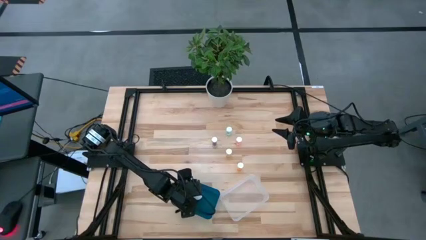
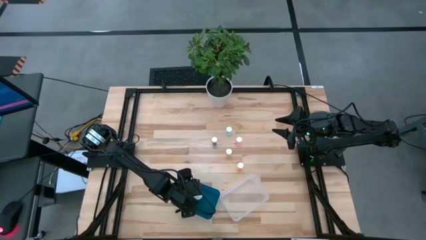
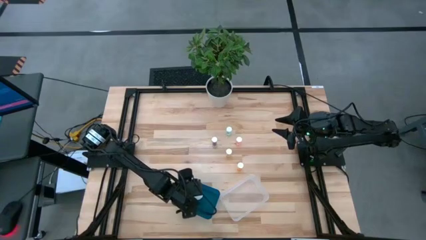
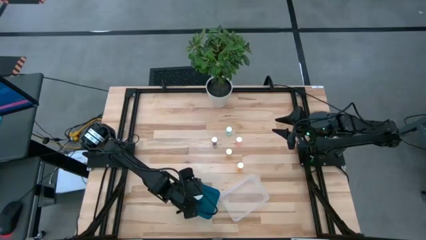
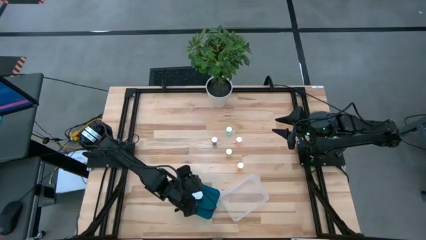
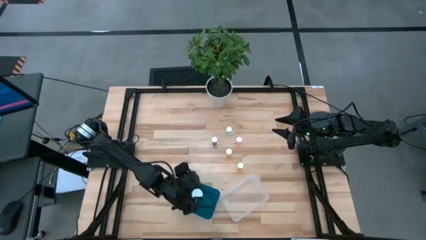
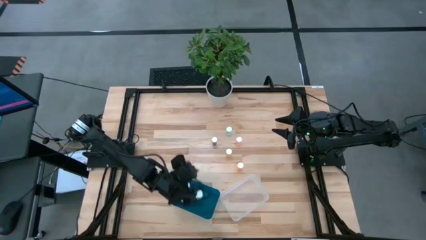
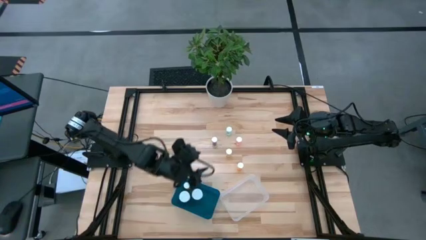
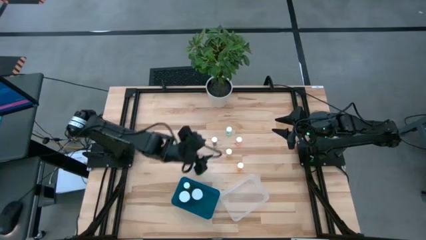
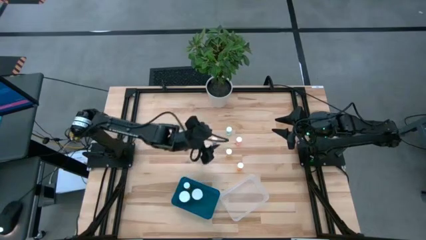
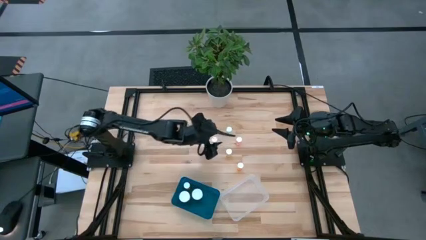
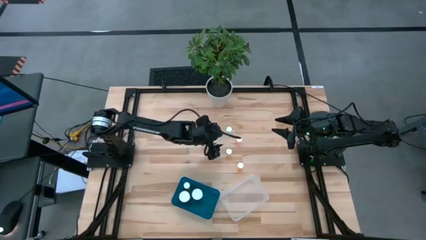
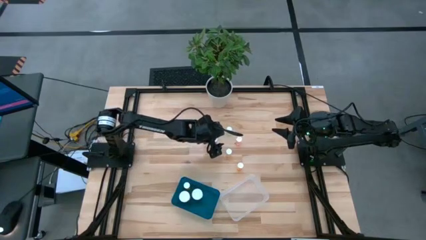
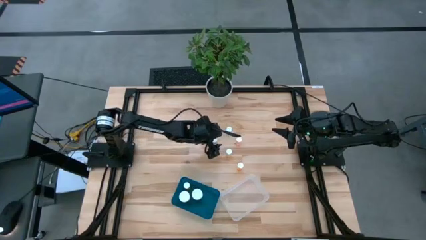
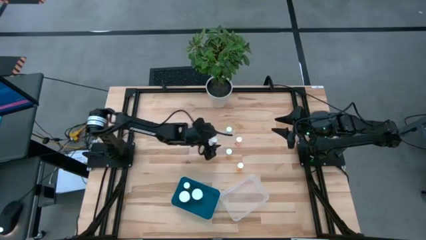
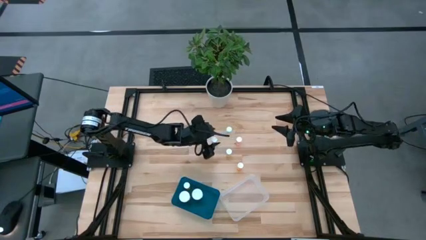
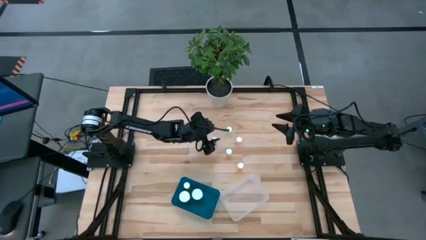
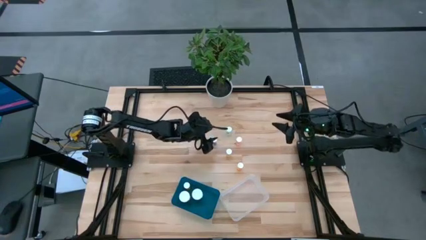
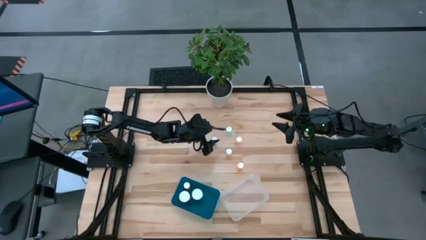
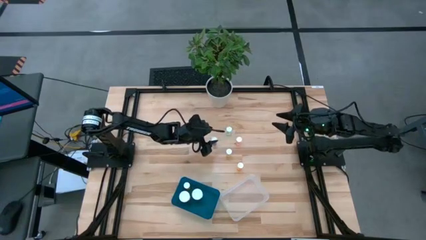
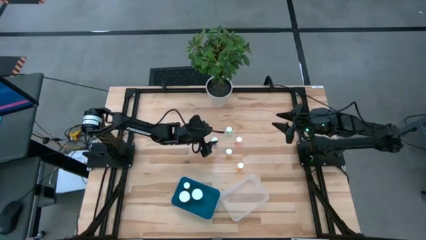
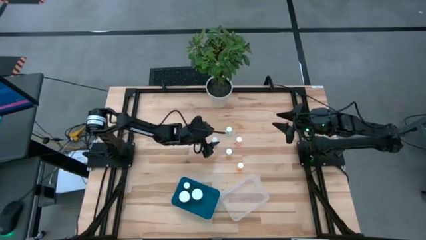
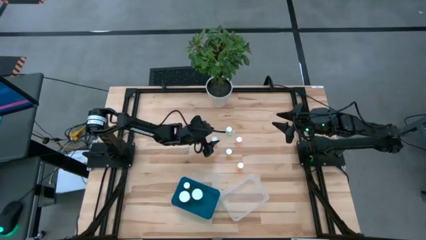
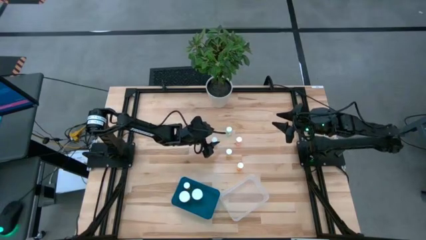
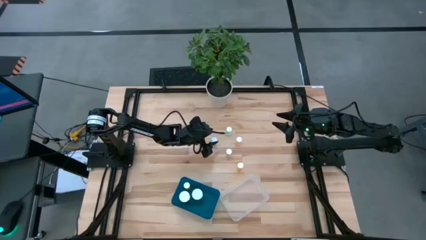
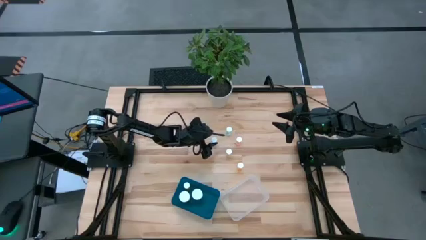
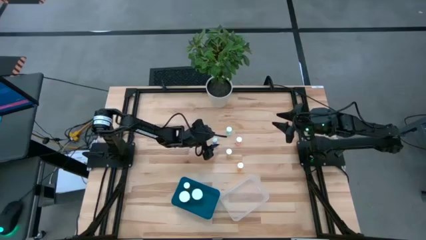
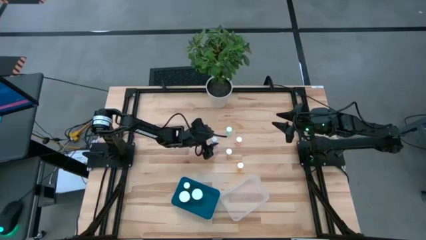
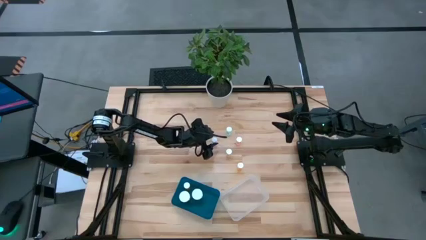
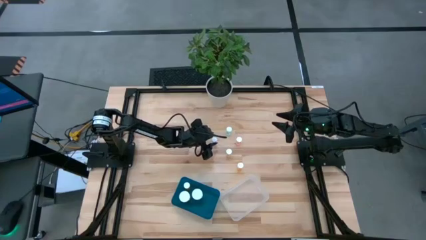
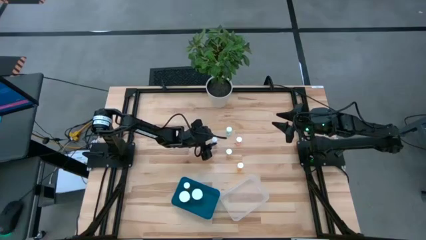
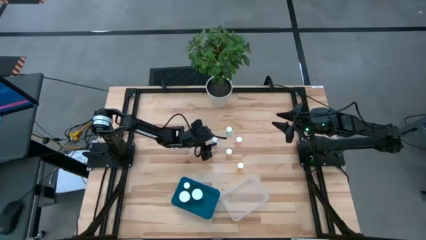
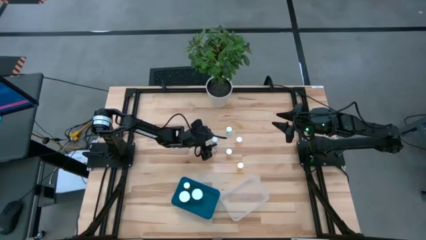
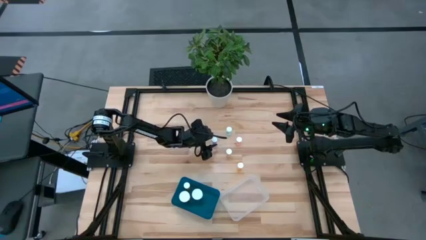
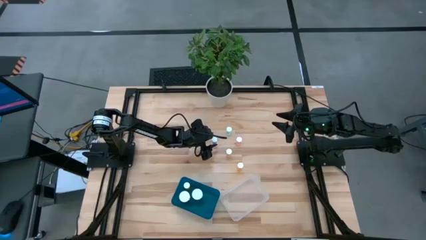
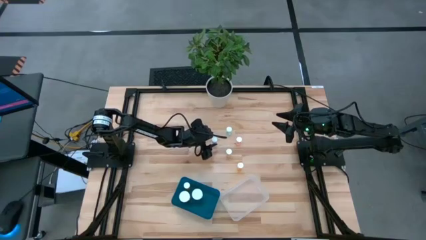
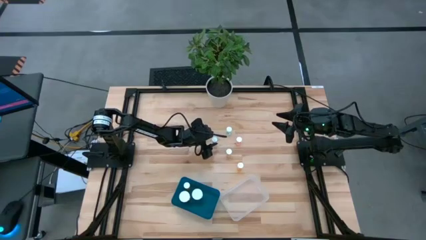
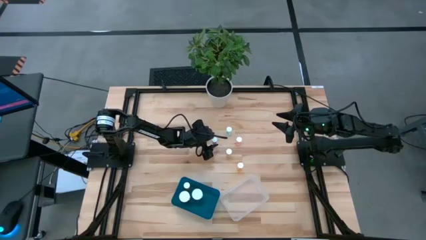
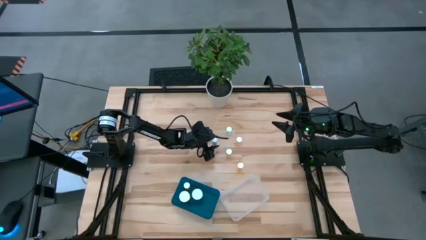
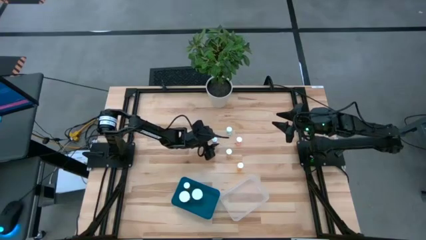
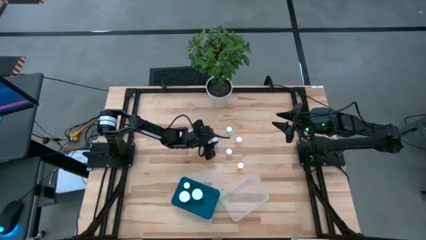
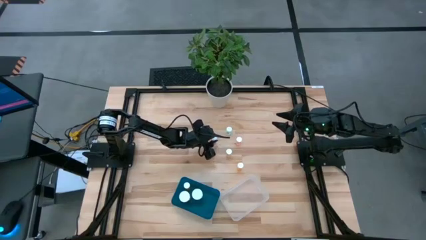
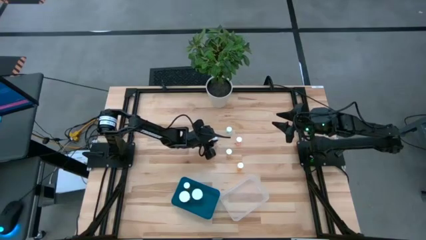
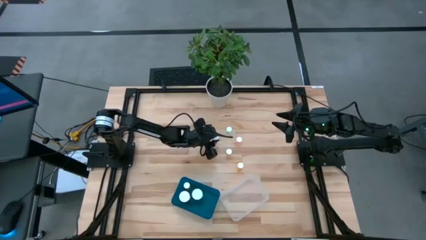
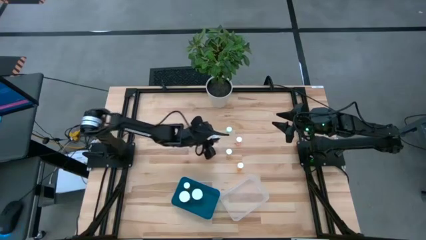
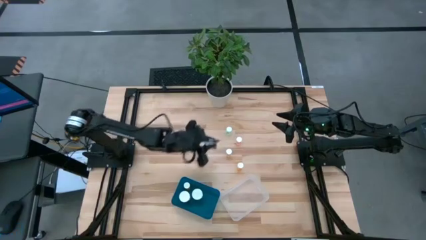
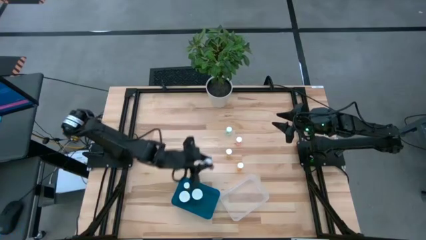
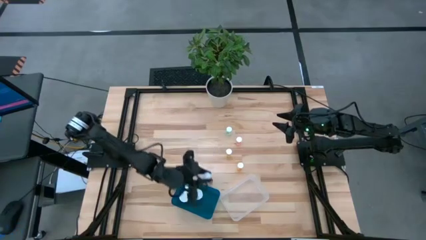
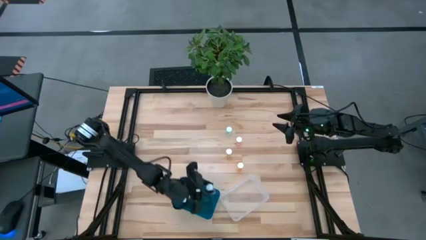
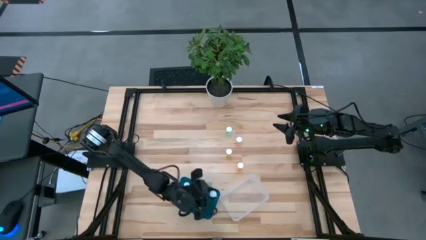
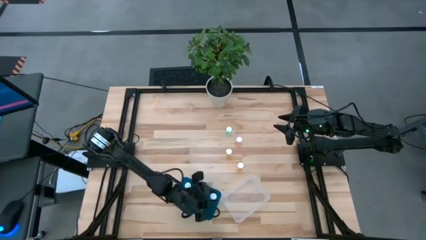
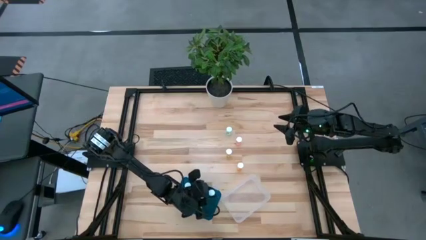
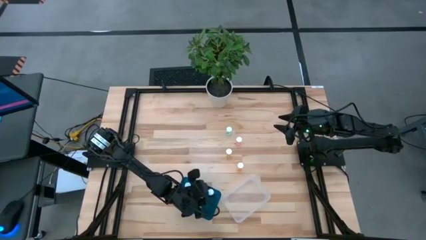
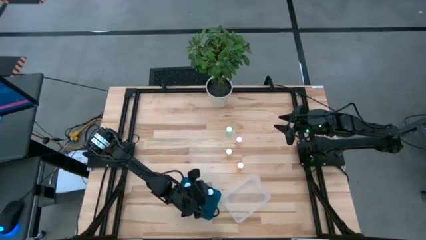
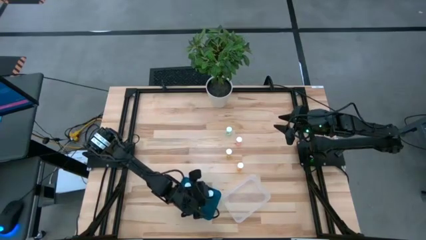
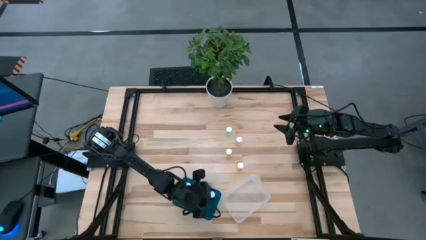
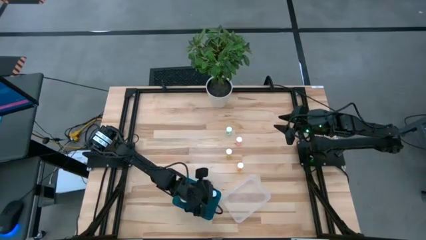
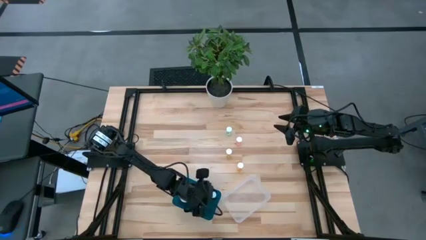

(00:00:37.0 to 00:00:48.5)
Task: Pick and place medicine bottles into bin by pill shape (circle, oval)
Put the small blue pill bottle into the blue bin

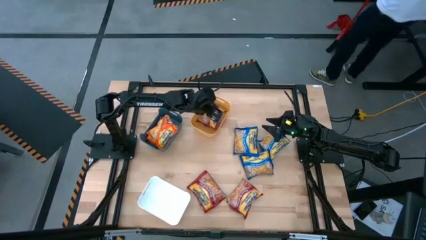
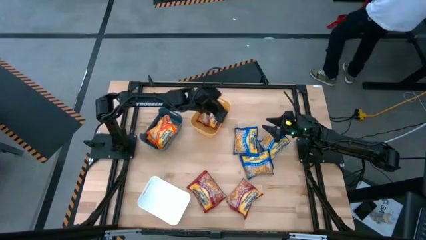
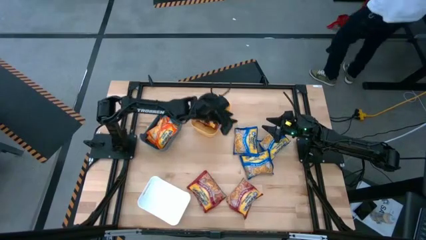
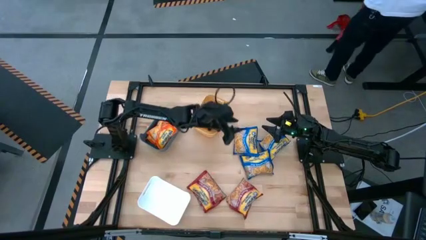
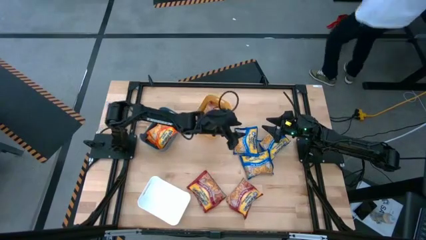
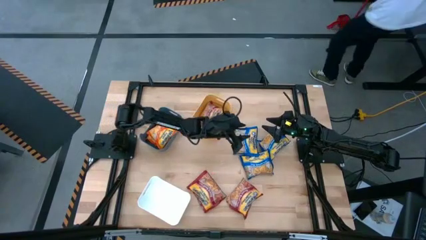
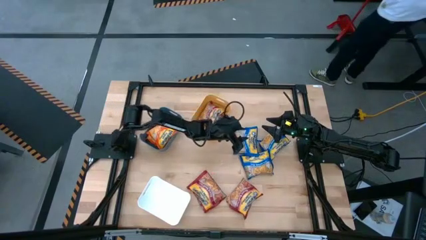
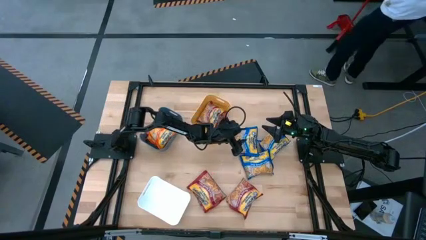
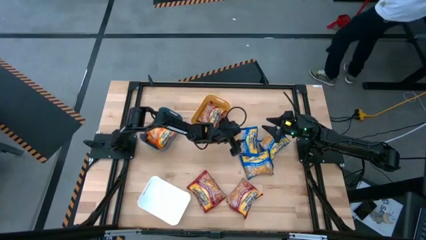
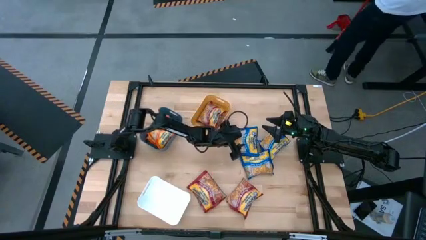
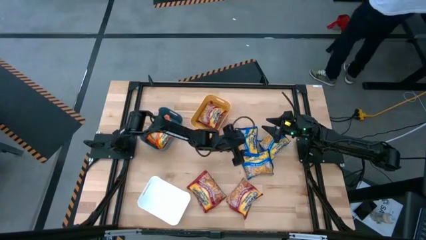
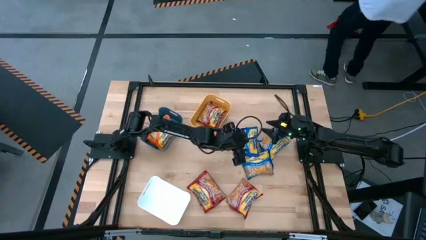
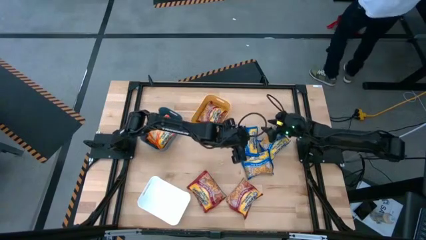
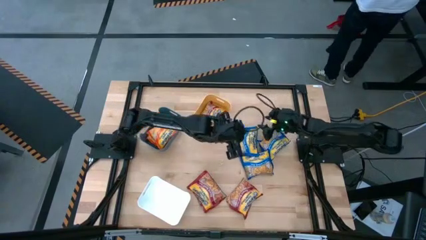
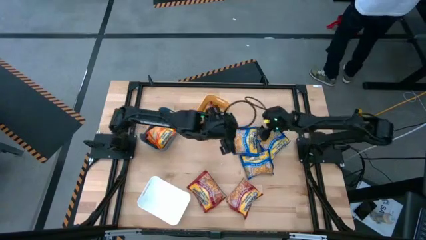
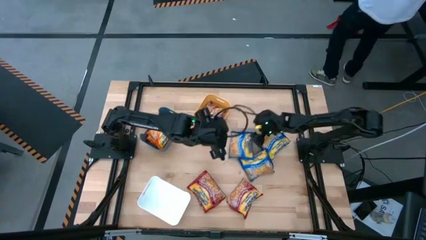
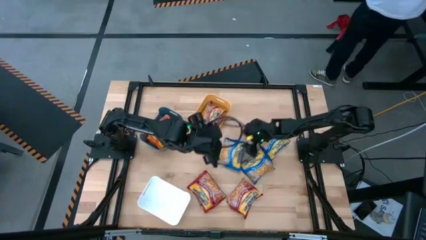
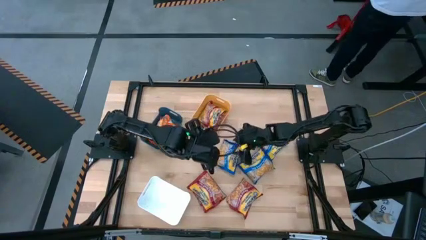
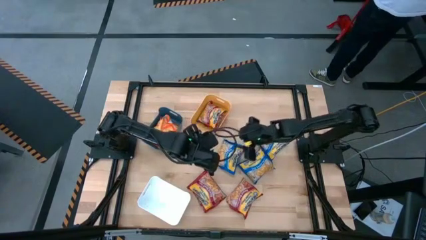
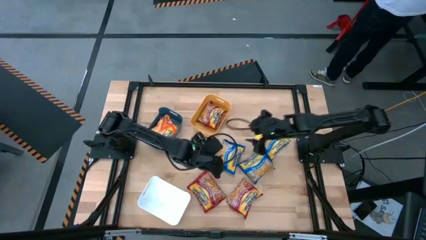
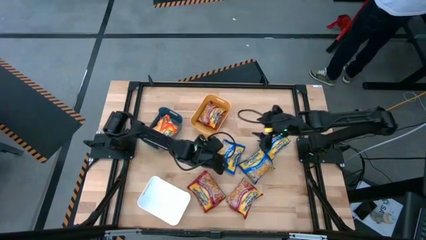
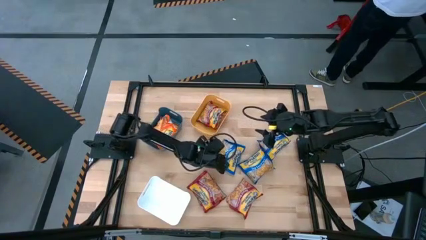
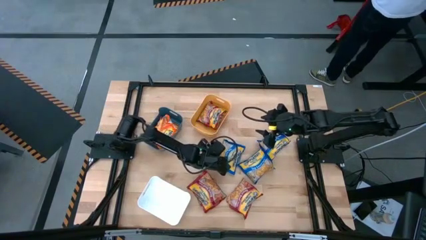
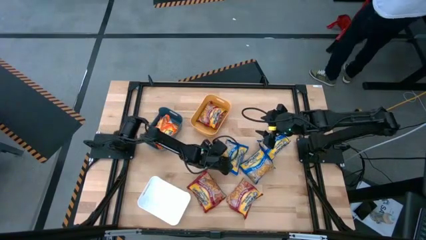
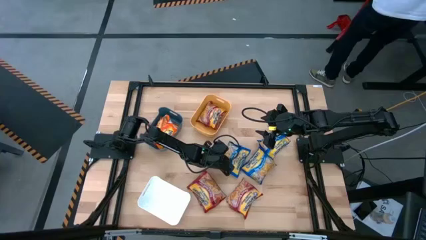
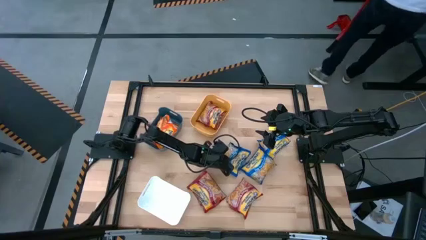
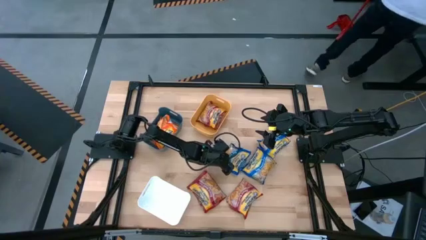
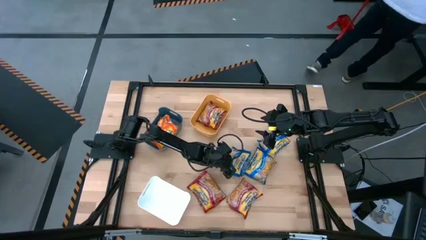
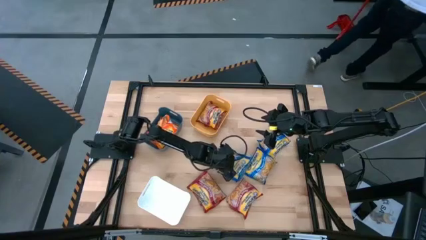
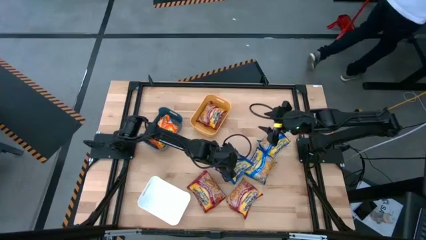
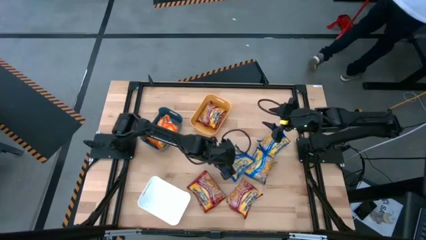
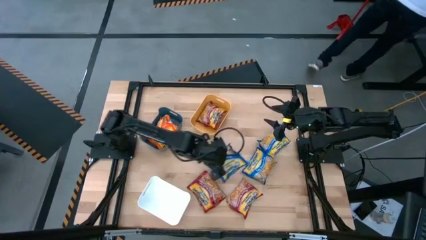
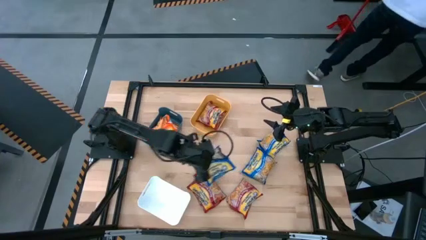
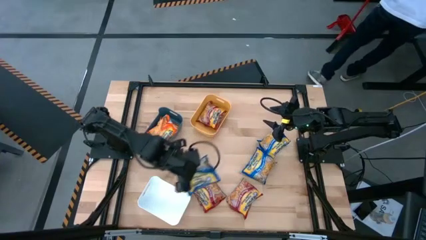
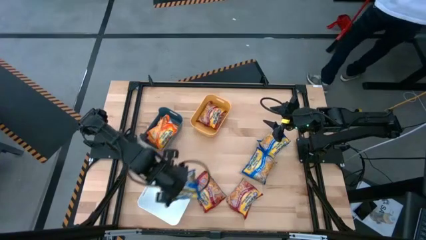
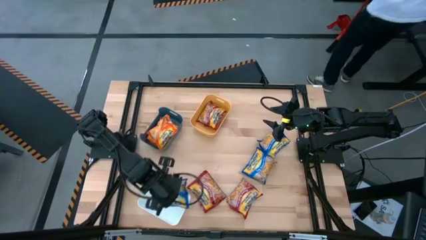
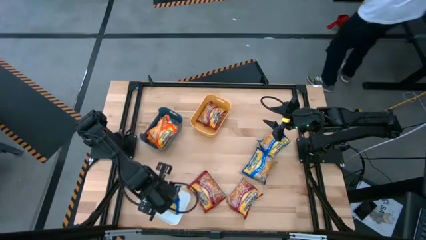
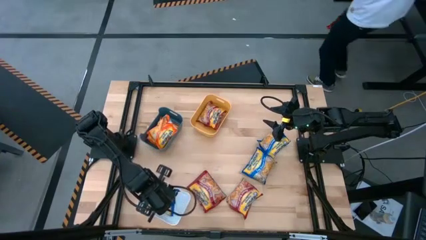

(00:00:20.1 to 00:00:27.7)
Task: Sort Maruchan noodles
Put the top left blue noodle pack into the white bin
